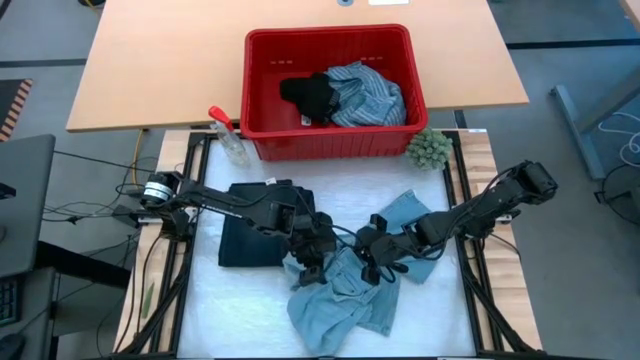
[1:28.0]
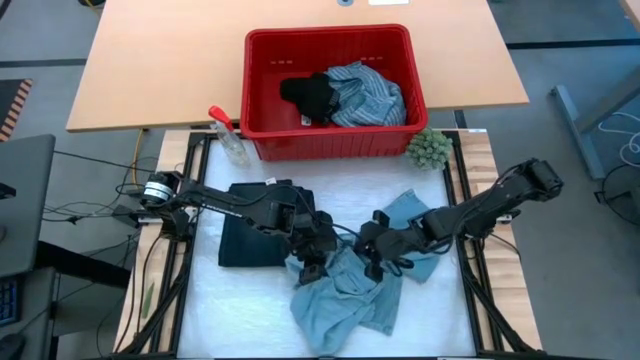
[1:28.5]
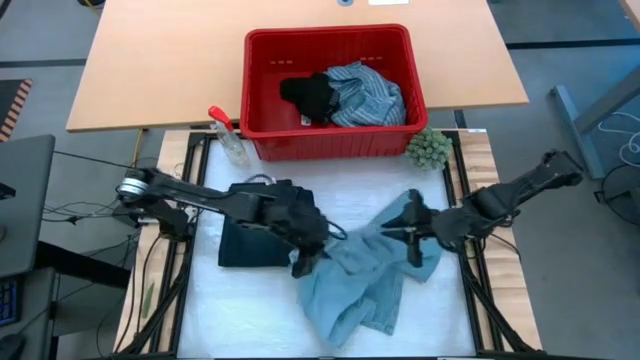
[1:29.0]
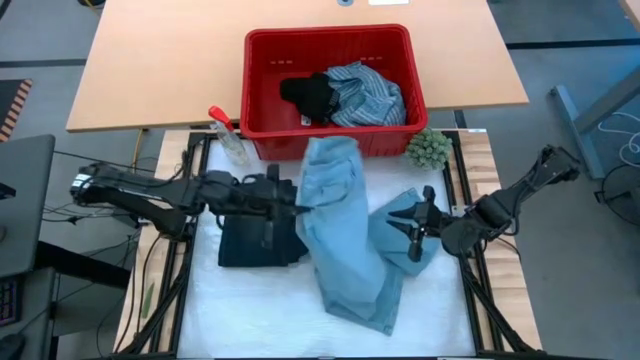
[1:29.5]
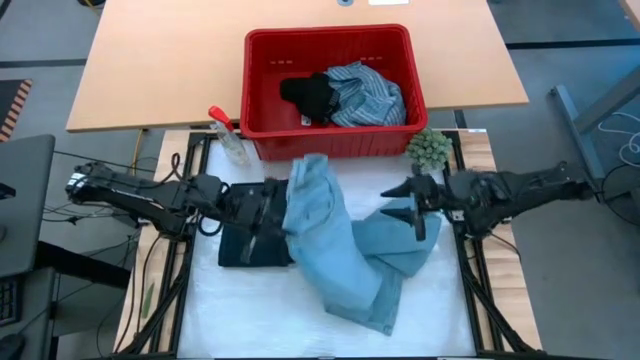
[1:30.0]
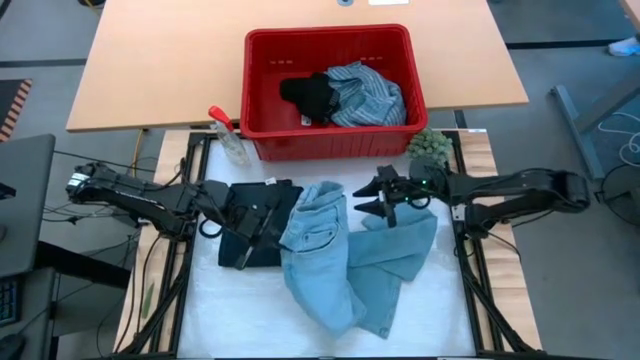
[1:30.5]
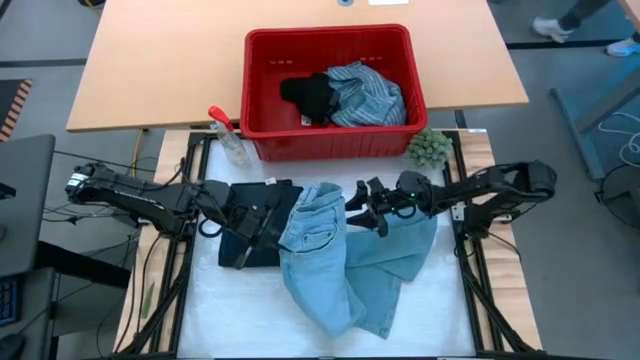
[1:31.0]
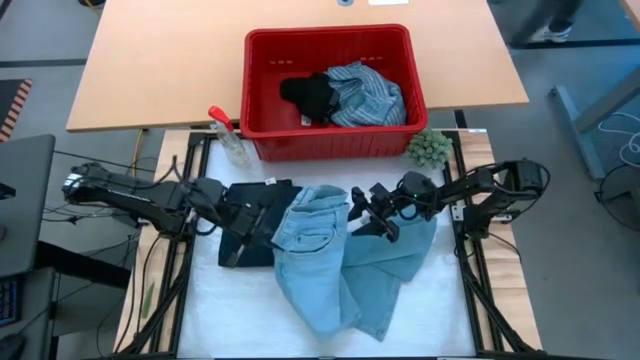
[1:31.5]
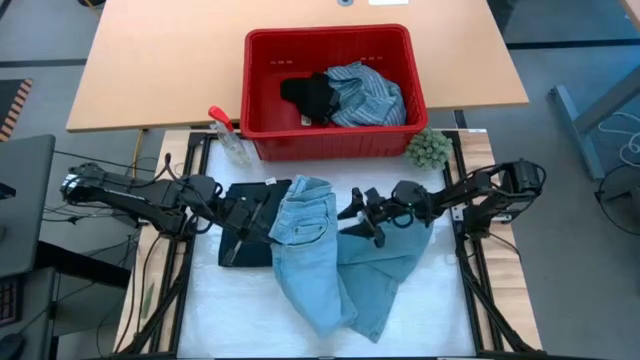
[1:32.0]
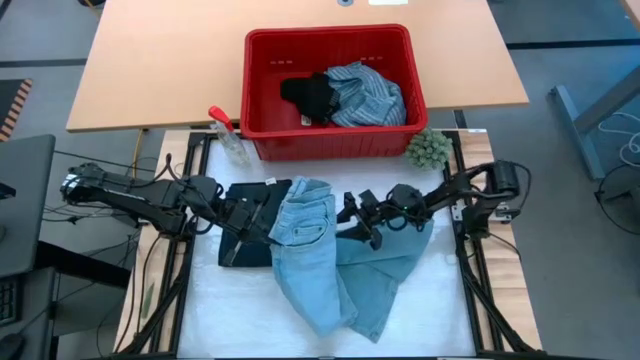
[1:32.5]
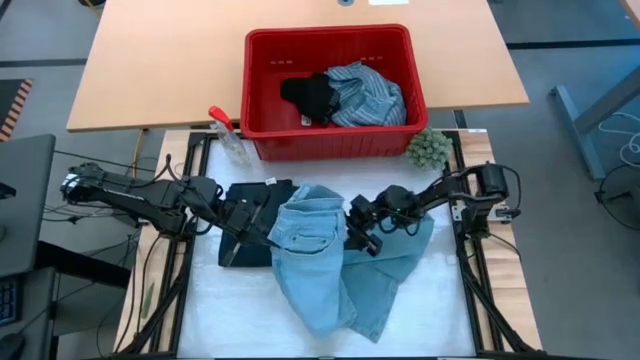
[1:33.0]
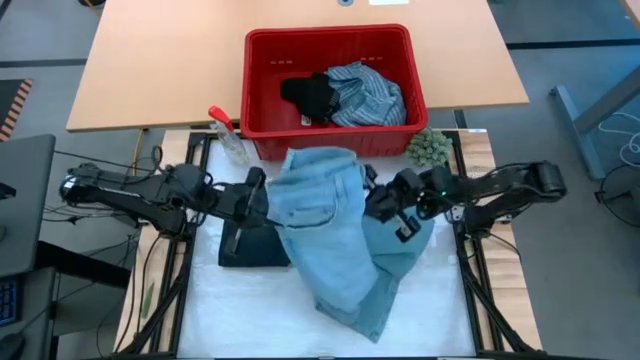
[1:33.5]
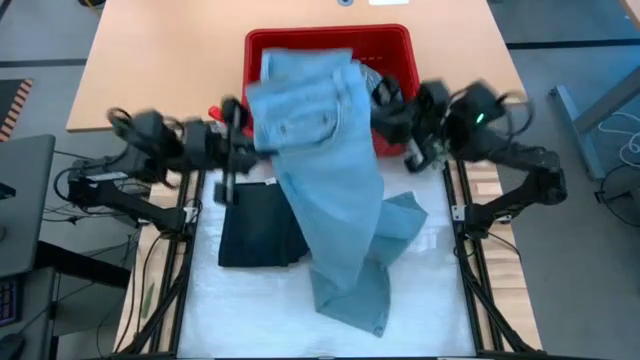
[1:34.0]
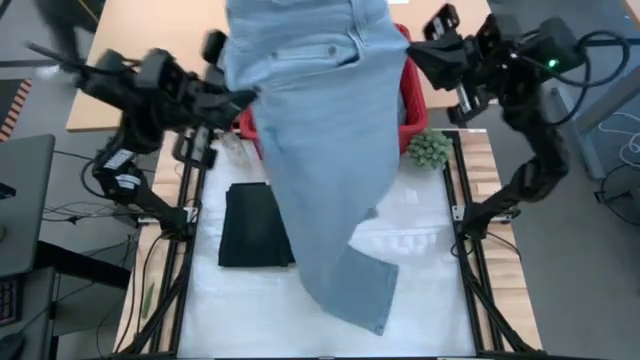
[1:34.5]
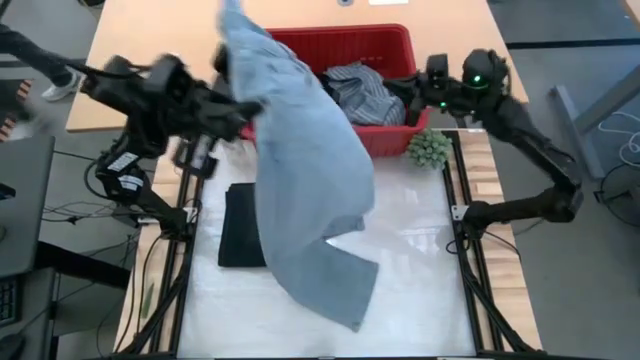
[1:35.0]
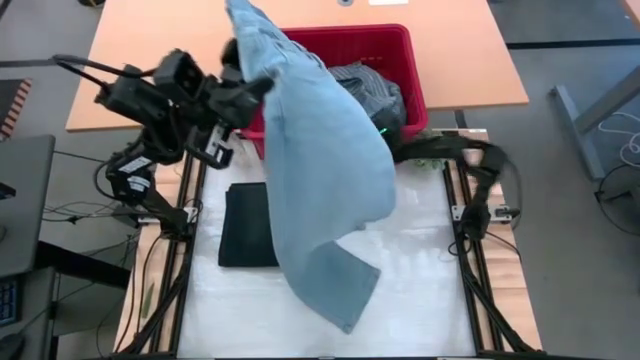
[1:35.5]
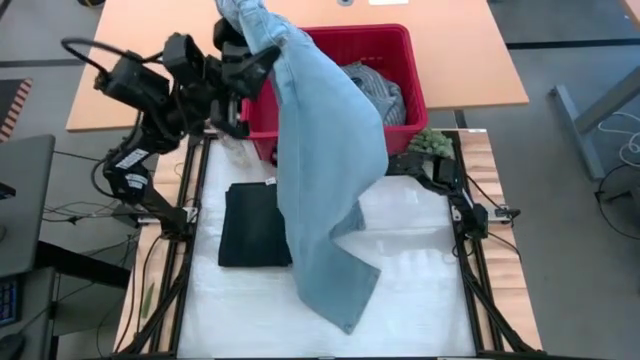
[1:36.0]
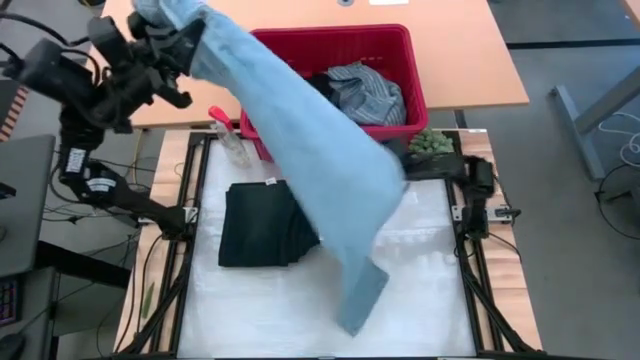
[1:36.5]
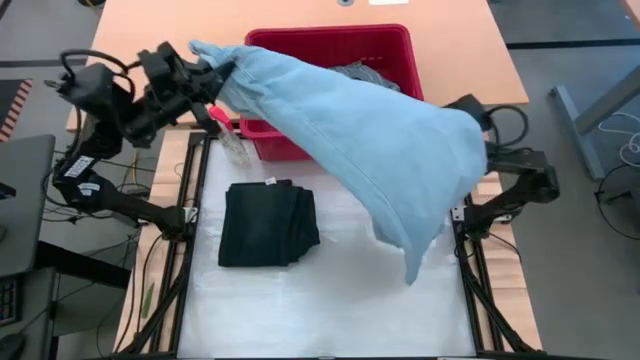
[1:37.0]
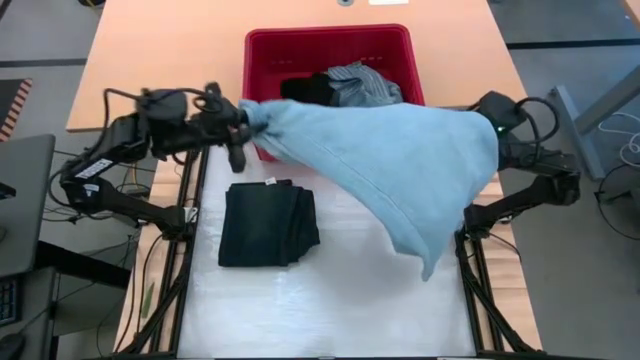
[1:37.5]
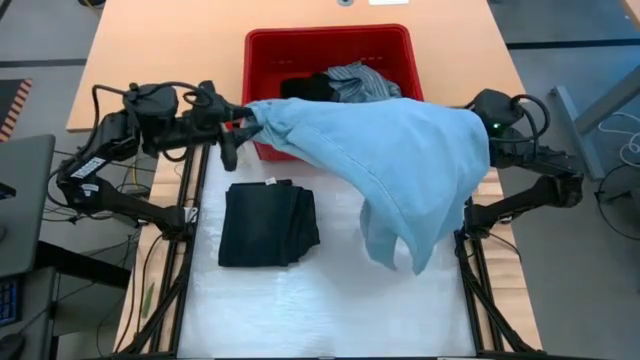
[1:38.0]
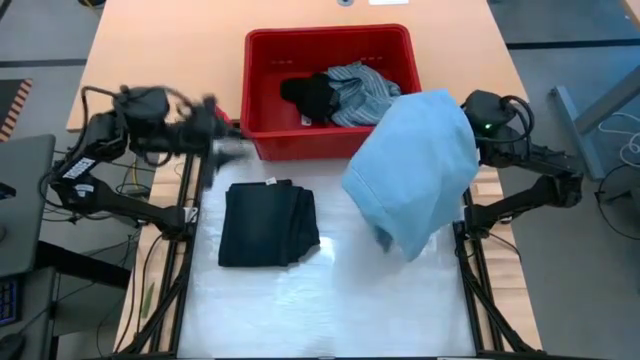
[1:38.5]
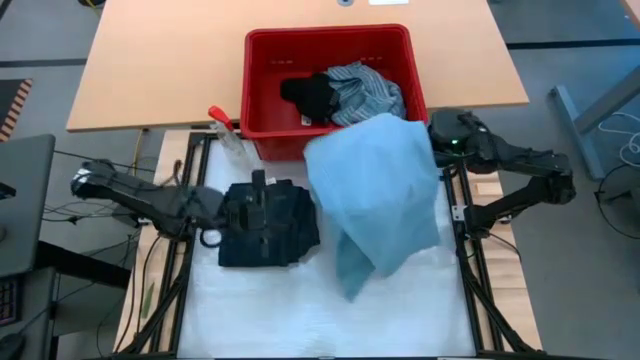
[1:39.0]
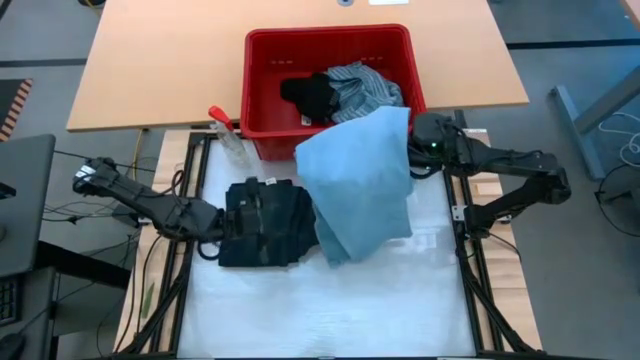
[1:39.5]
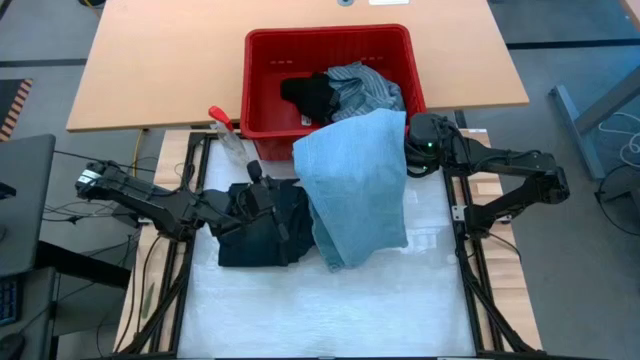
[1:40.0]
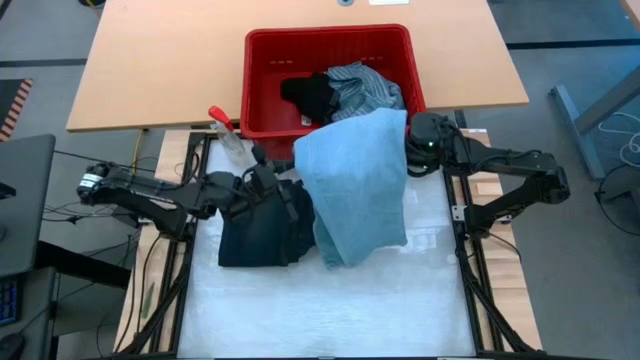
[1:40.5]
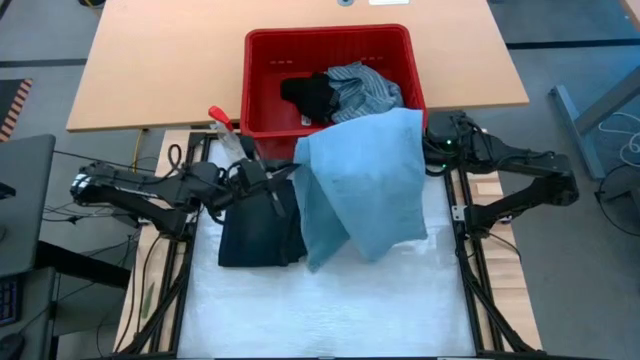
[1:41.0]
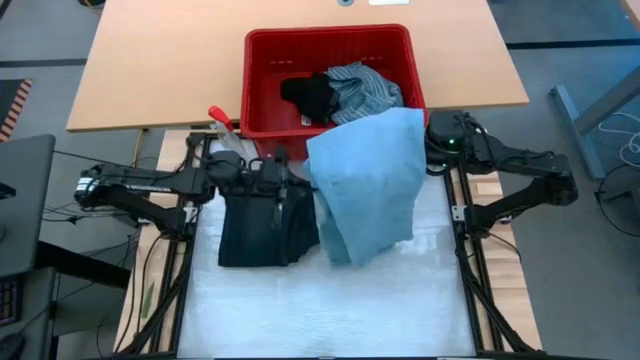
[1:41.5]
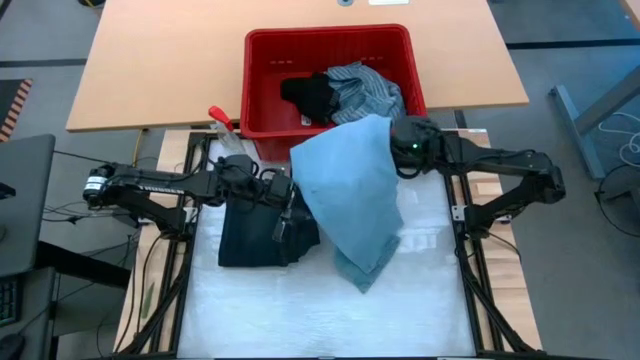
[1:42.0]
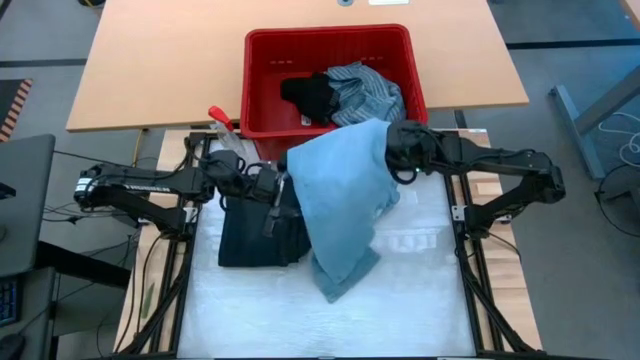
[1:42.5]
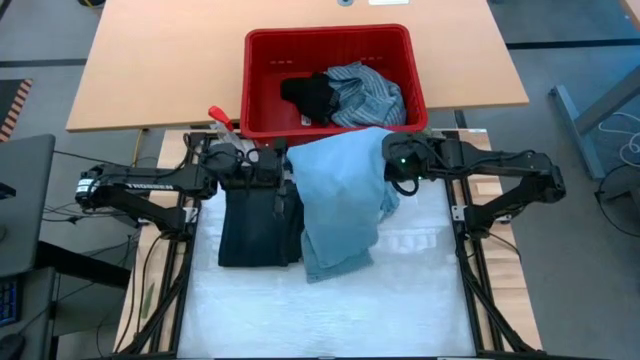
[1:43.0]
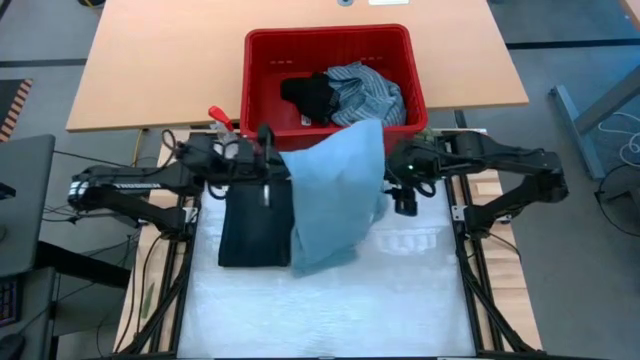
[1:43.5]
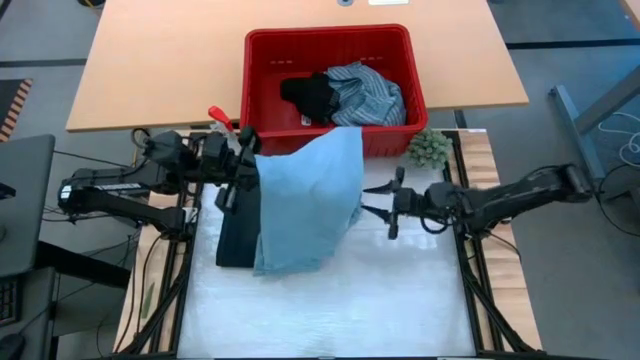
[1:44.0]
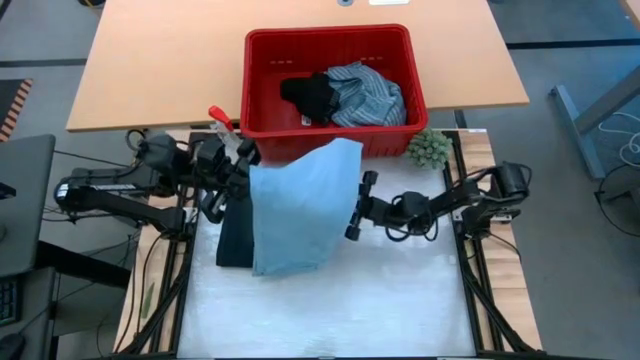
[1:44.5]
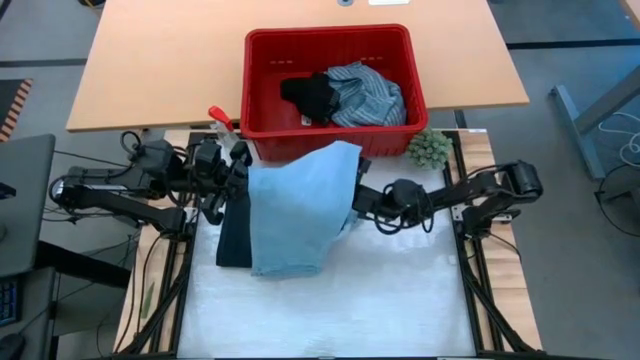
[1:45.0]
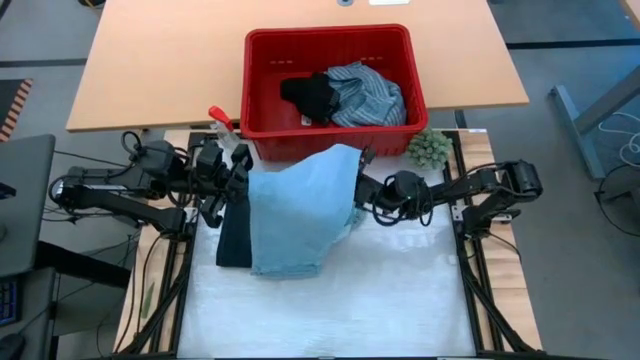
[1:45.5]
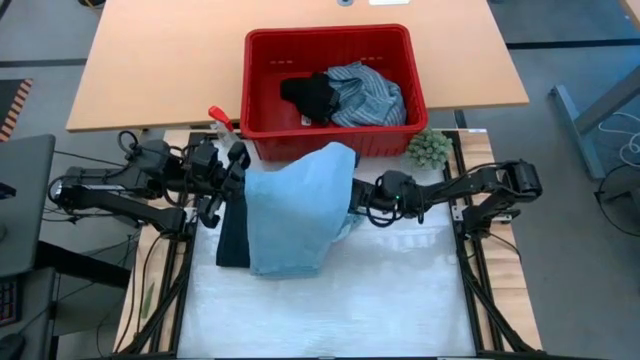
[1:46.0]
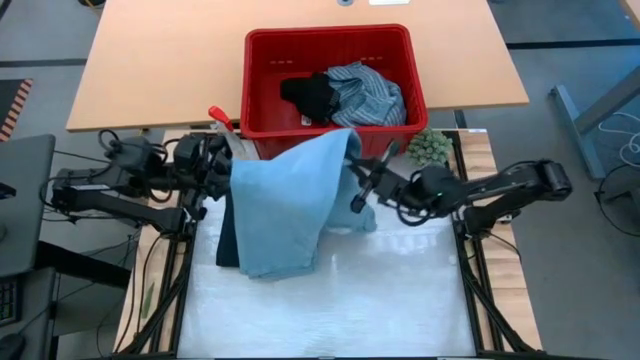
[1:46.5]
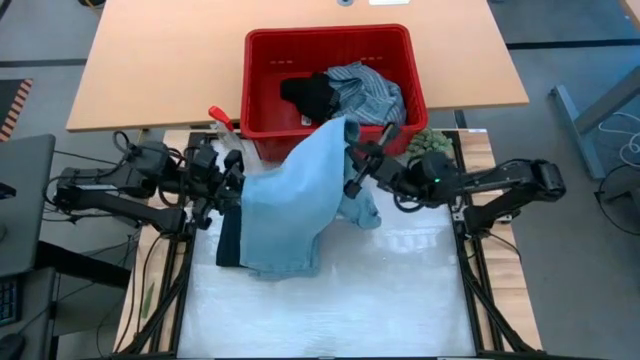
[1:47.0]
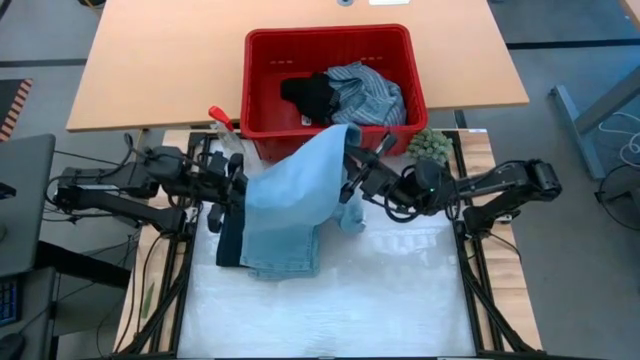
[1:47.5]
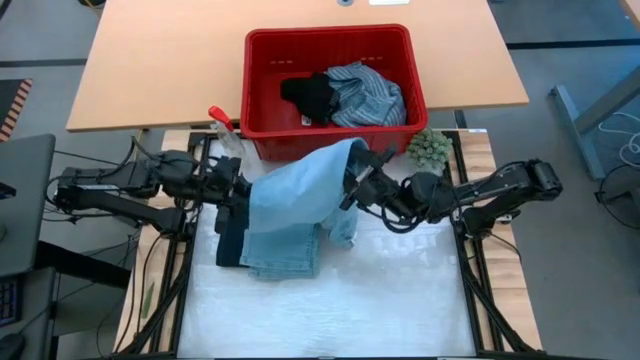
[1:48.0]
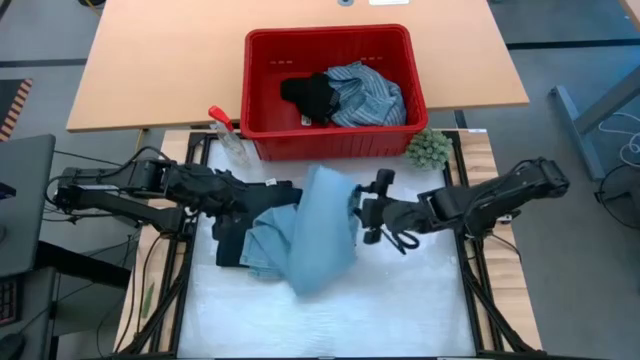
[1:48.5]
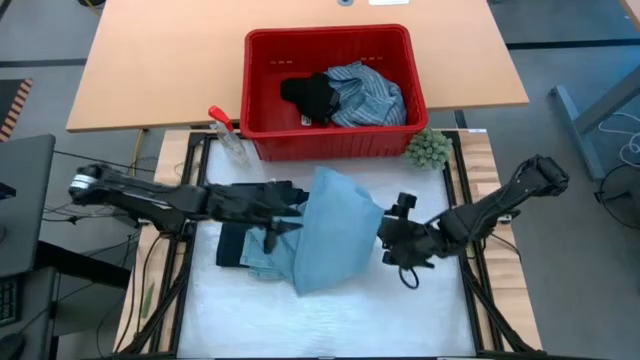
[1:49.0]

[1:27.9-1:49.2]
Task: Fold Laundry from Bin
Fold the light blue pants
